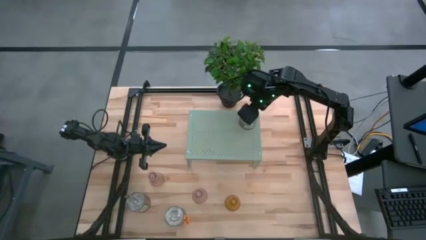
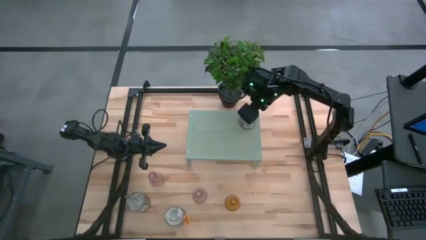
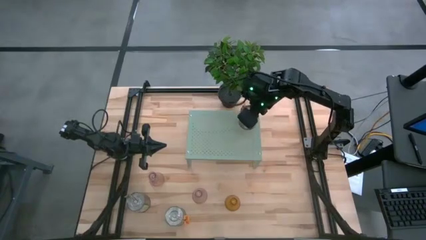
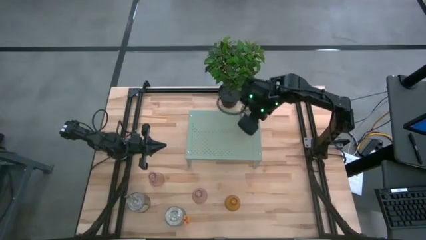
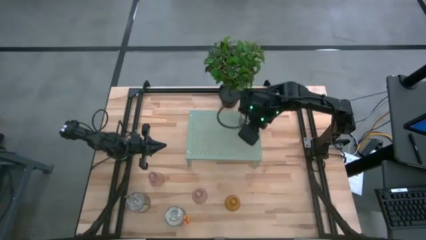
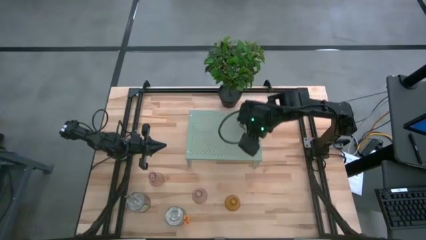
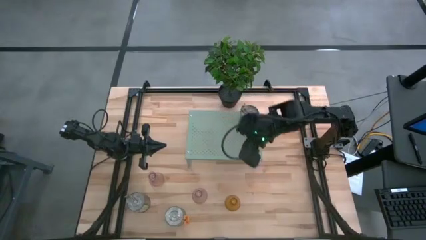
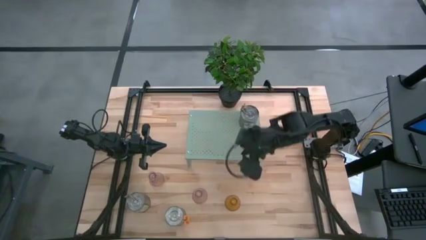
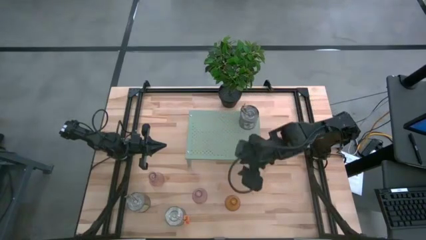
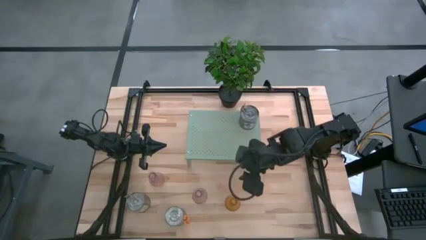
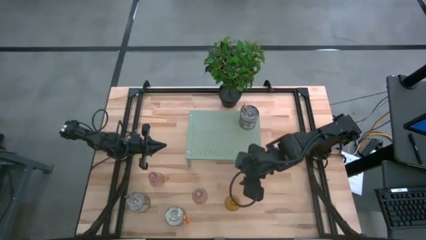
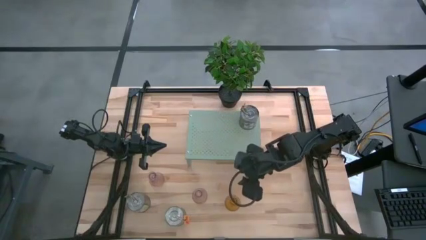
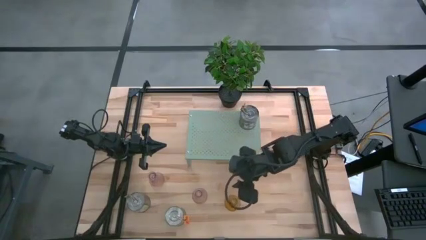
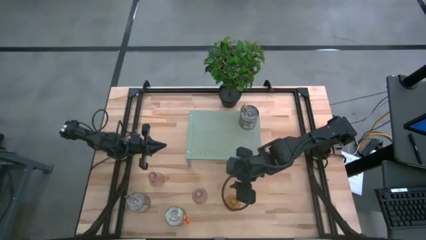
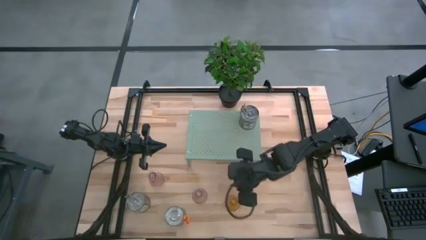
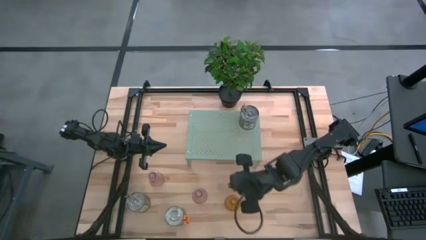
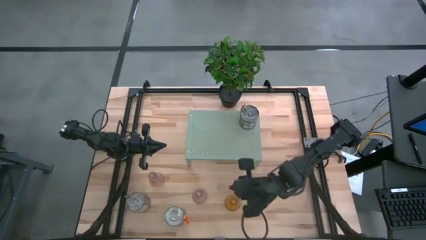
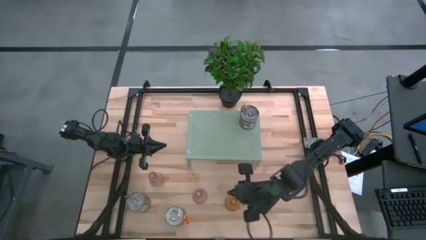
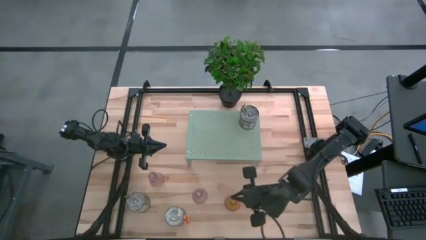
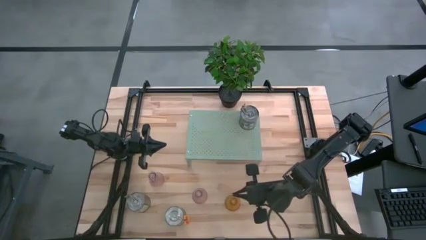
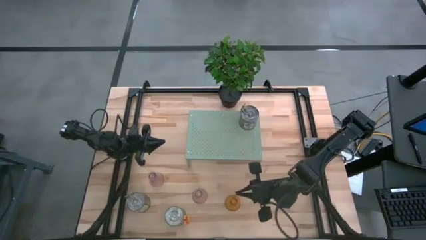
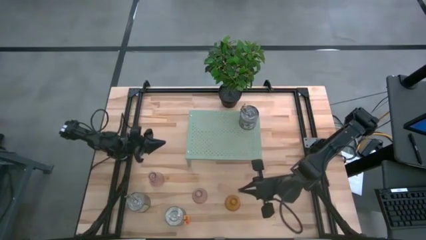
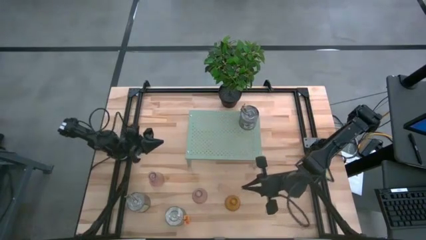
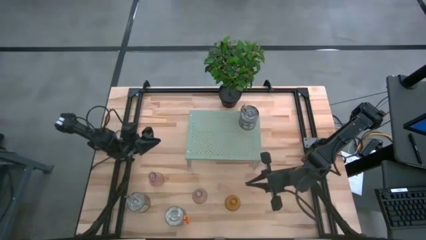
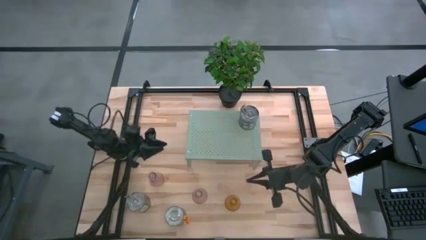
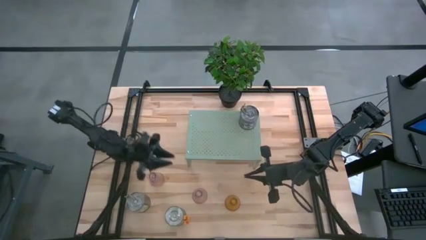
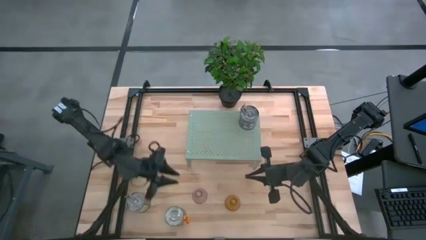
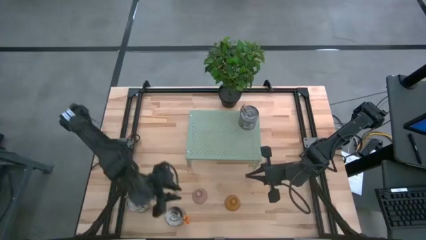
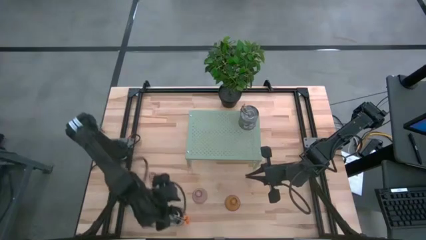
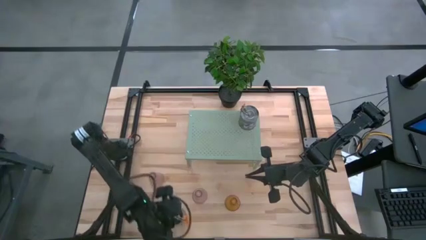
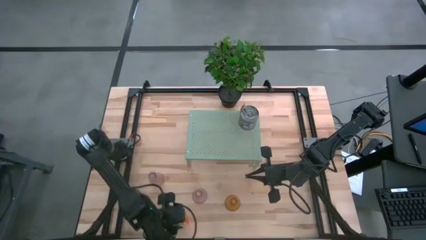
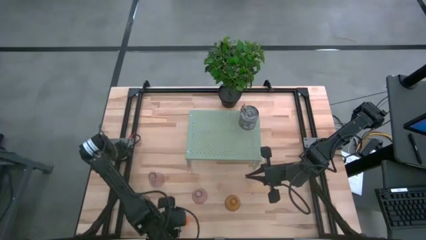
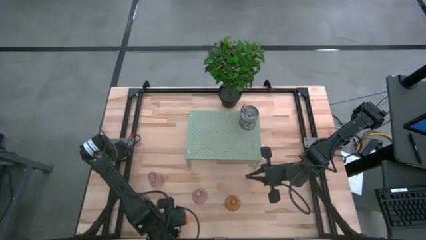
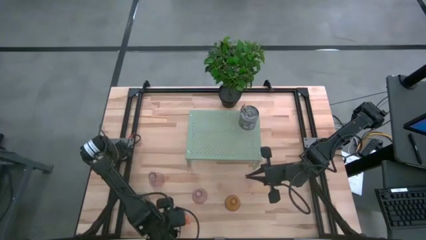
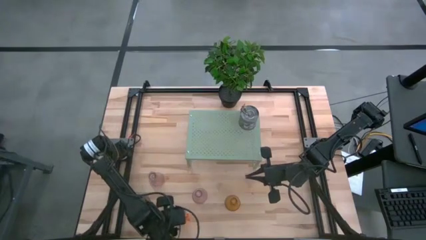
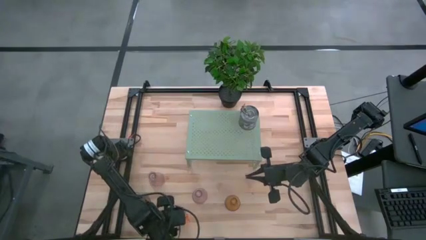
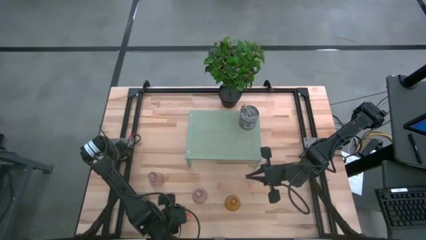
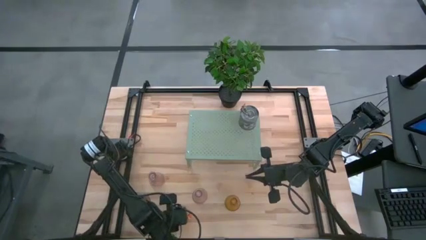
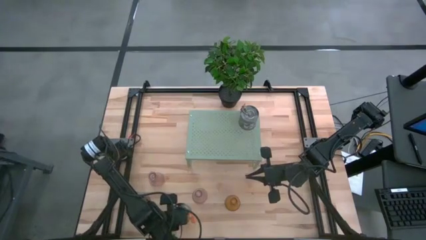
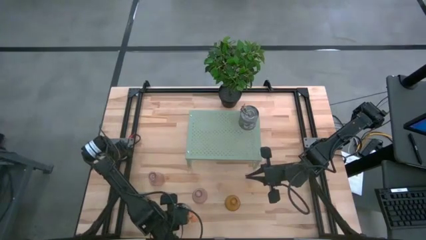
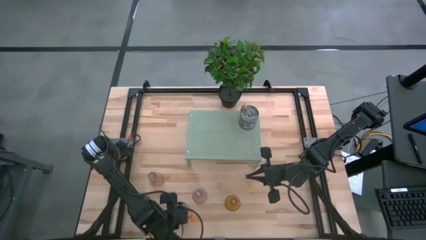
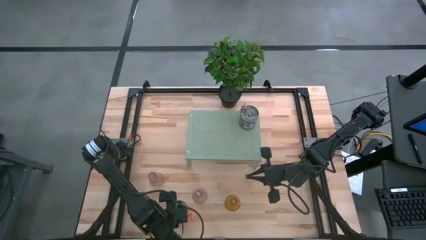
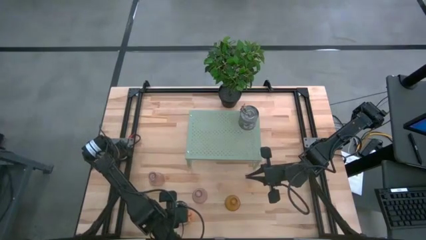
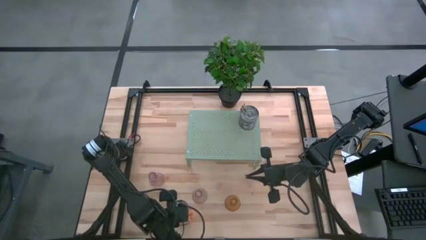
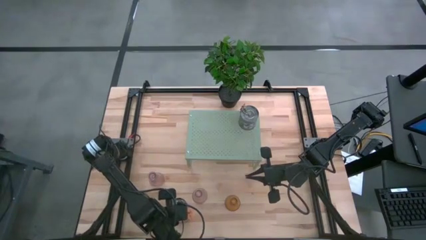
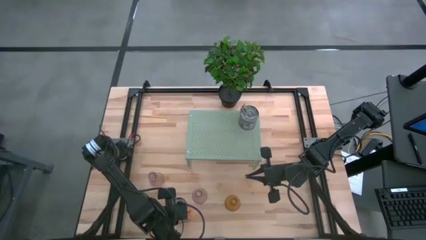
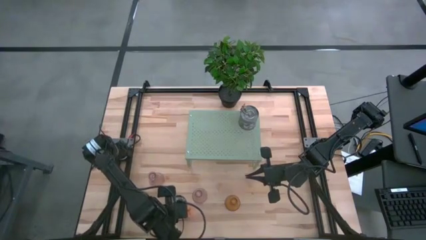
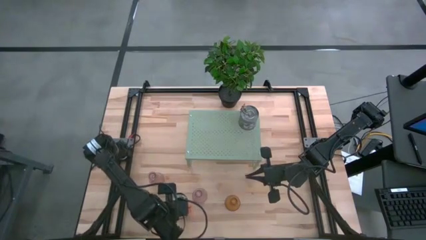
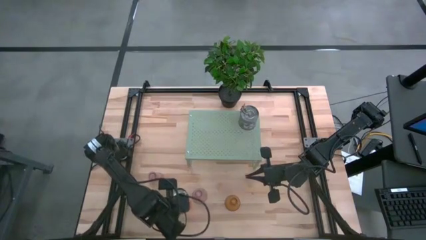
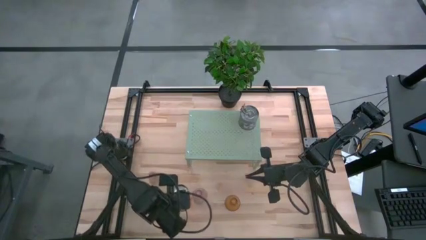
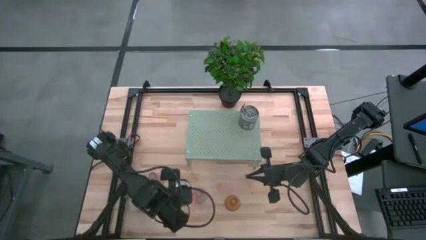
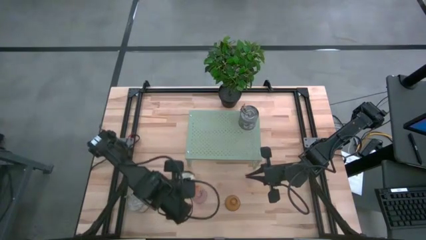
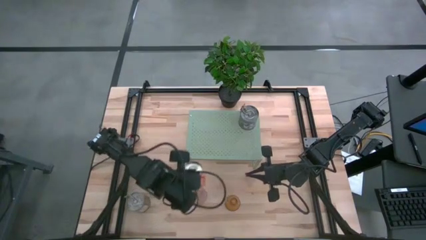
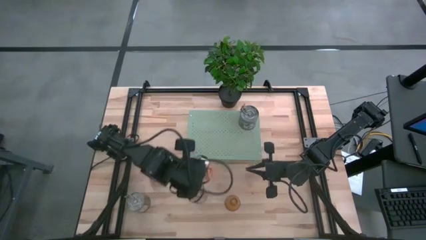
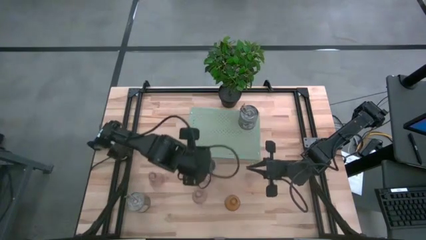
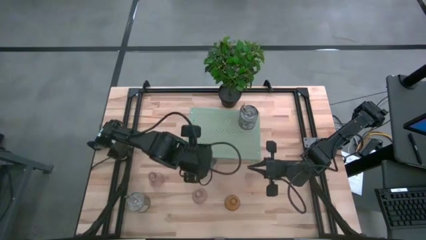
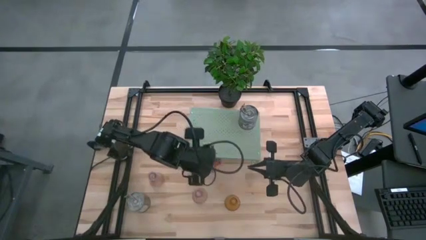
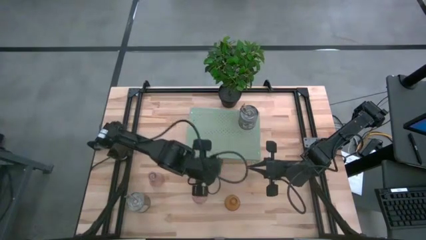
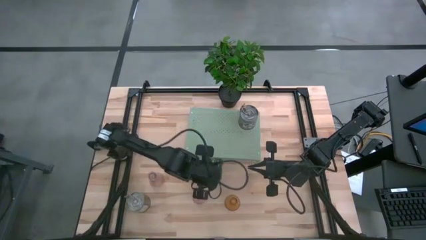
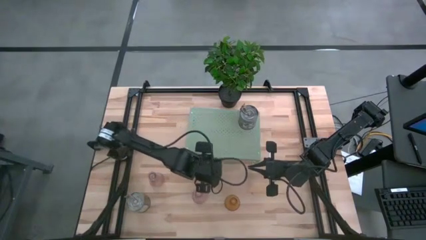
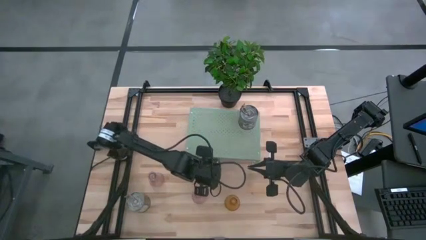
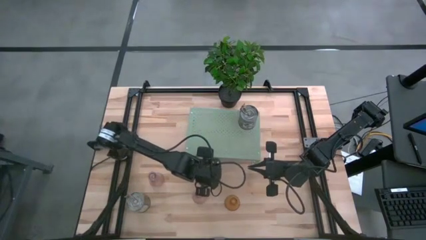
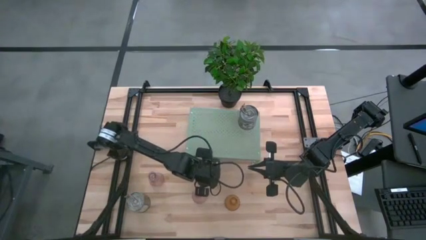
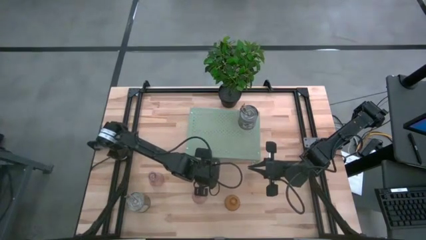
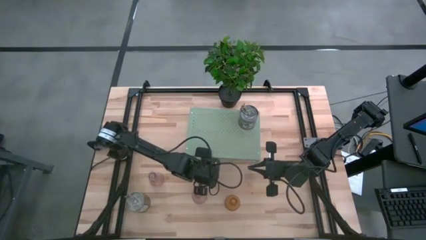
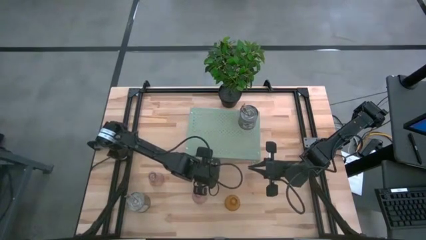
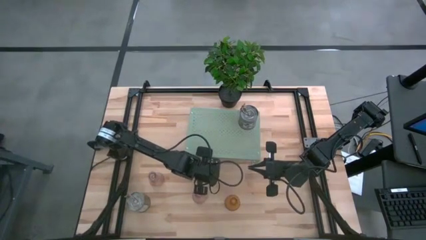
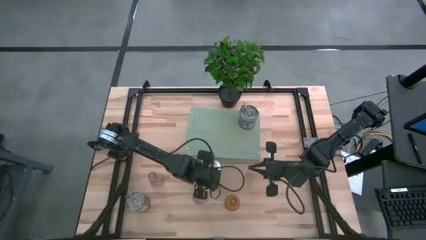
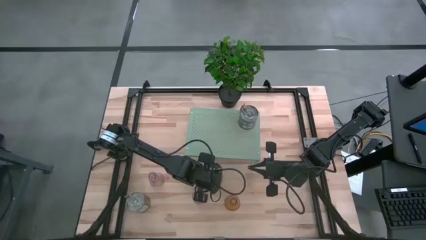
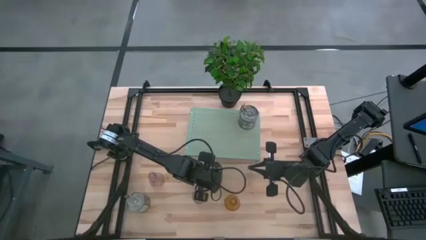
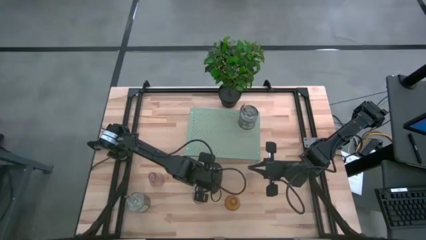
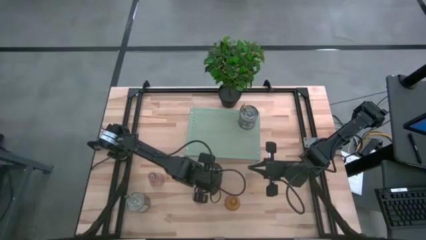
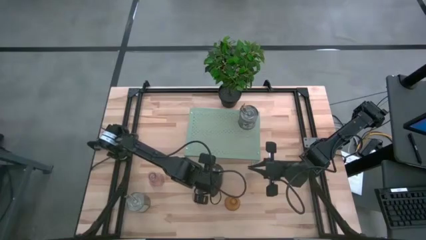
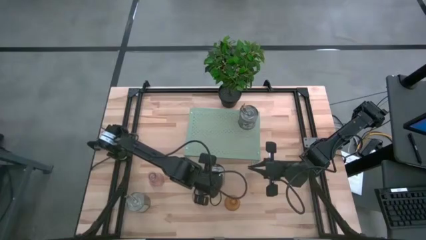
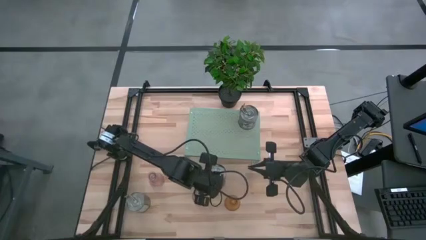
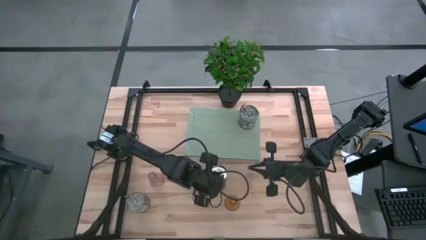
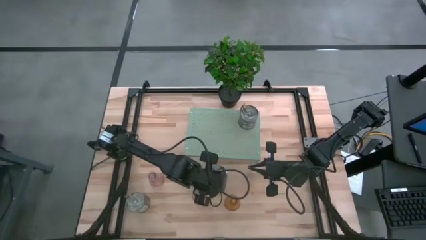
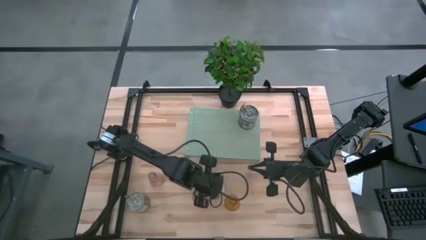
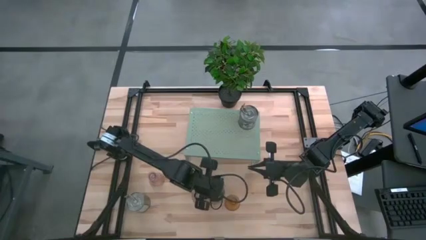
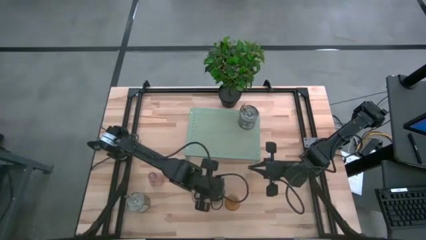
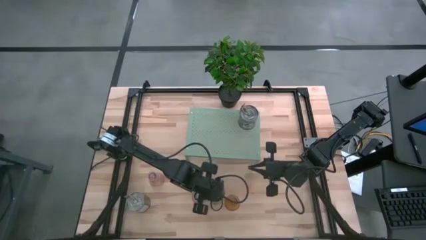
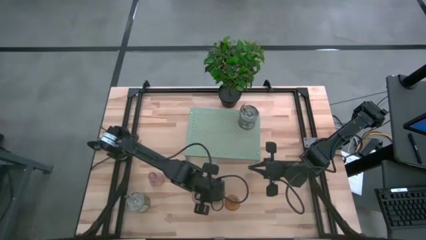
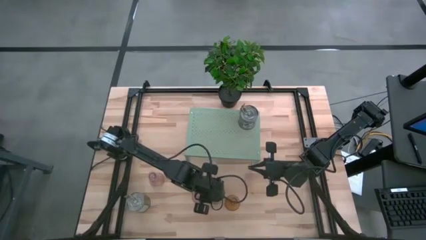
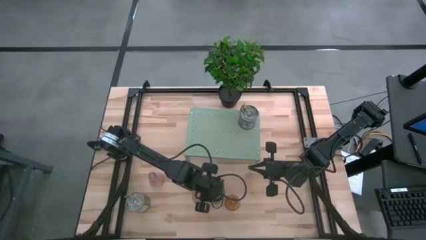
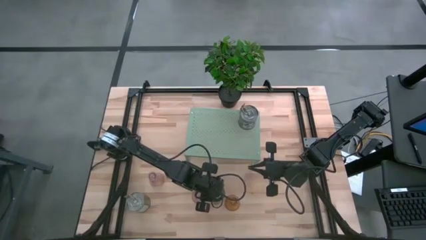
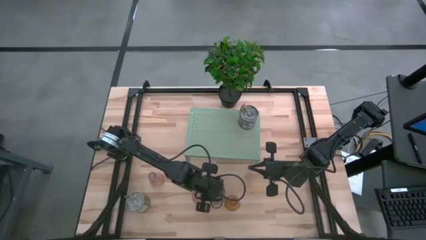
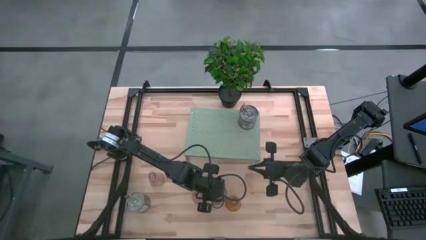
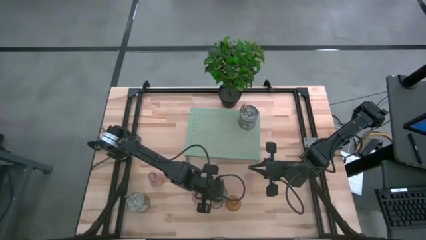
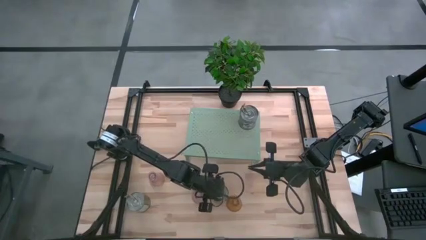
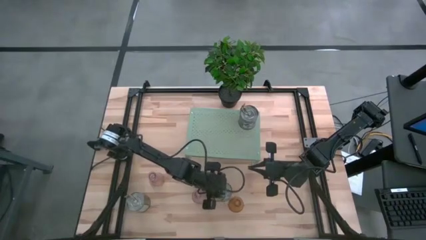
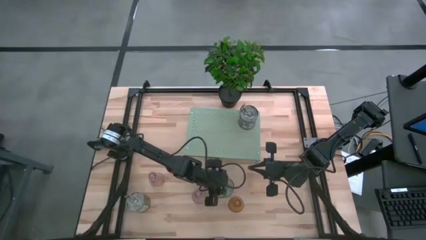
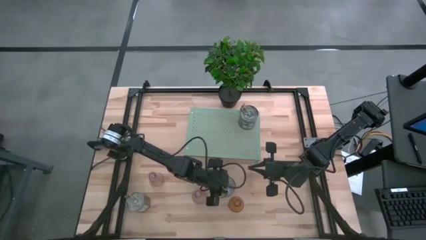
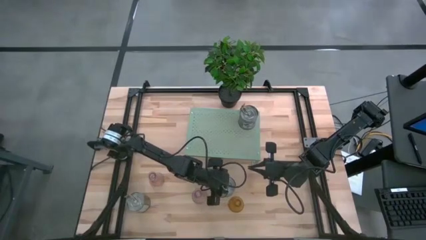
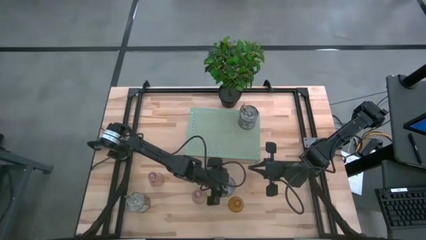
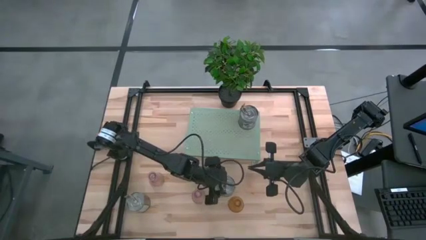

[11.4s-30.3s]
Task: Pick & Place candle stick holders
Put the right silver candle on the shelf
